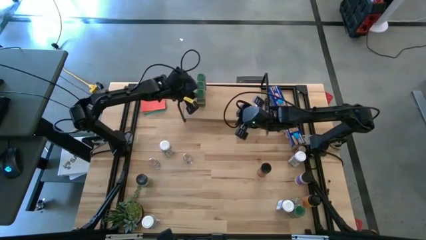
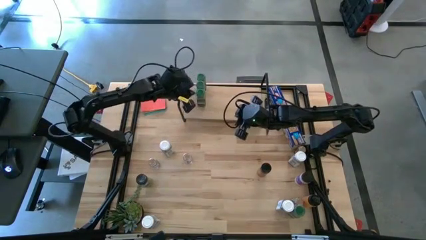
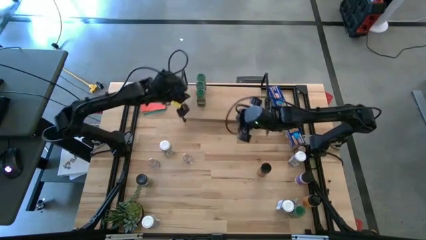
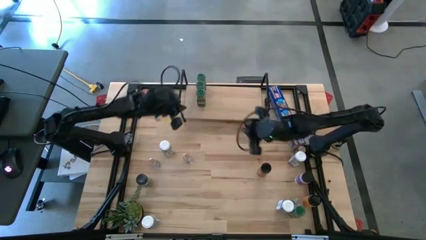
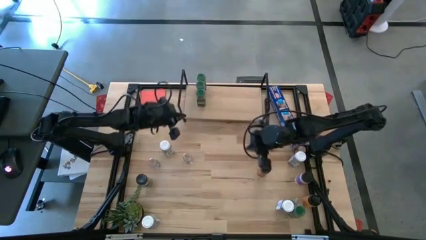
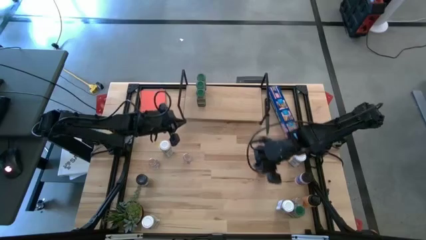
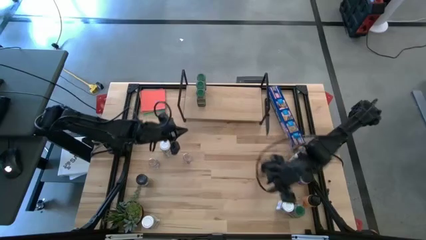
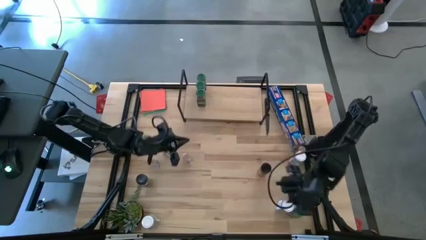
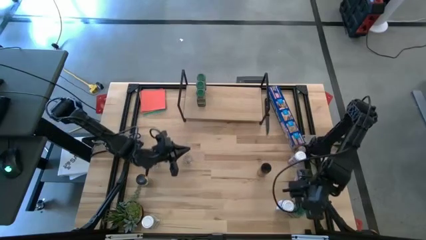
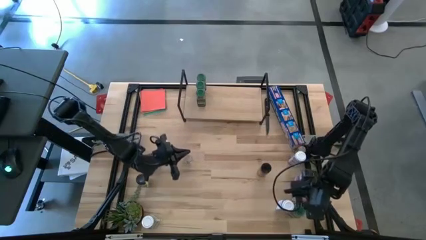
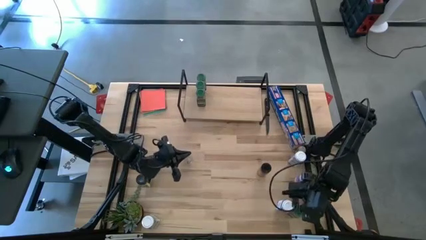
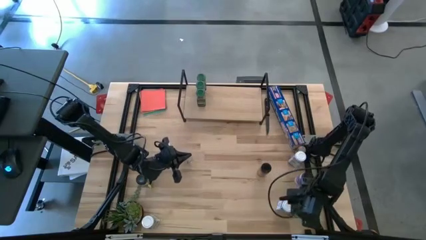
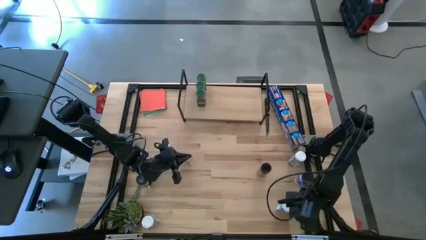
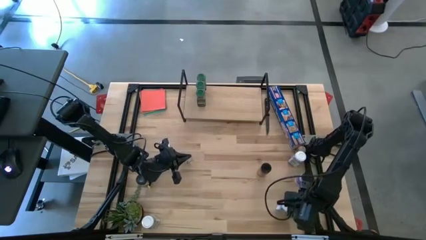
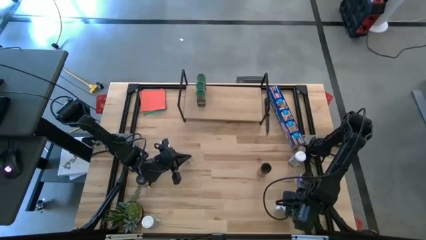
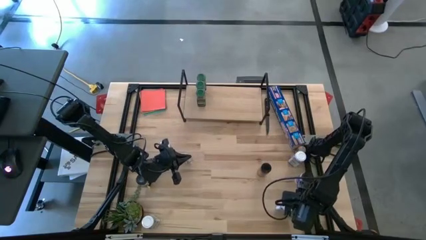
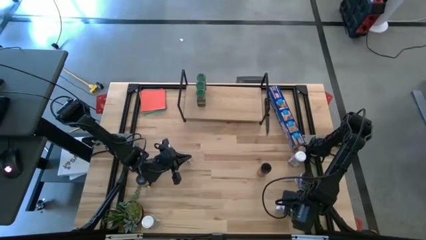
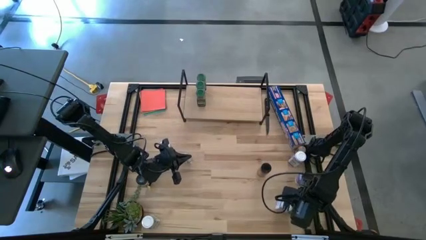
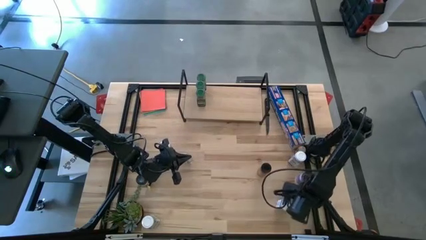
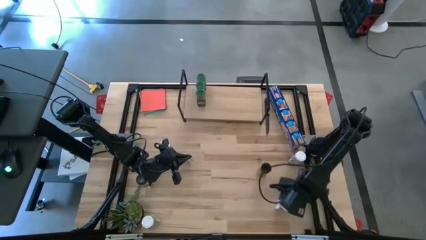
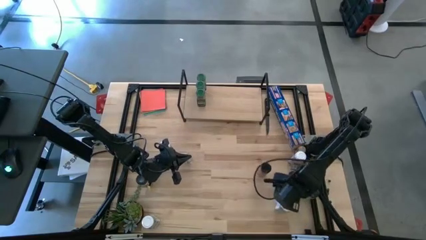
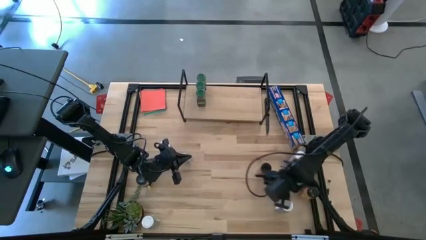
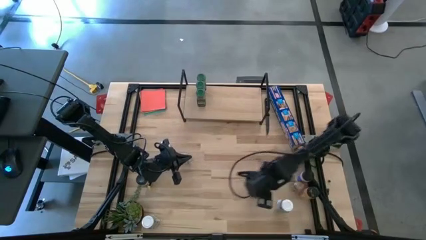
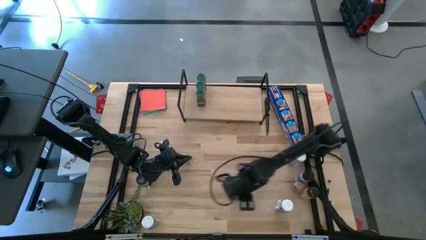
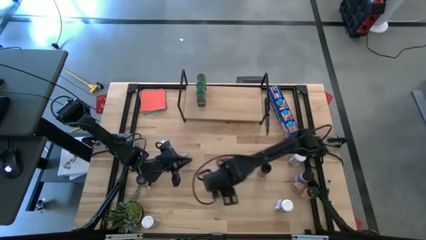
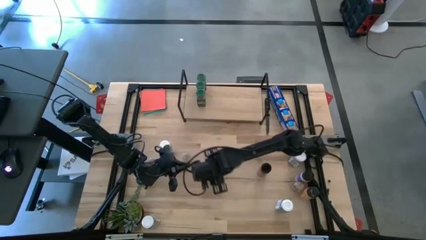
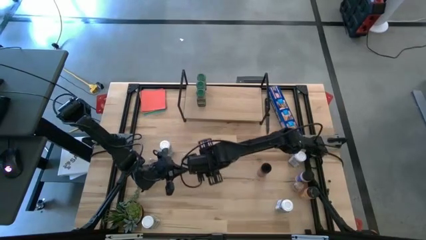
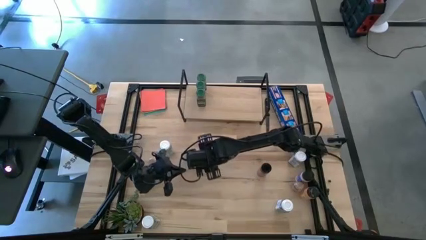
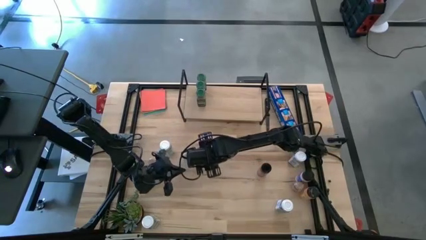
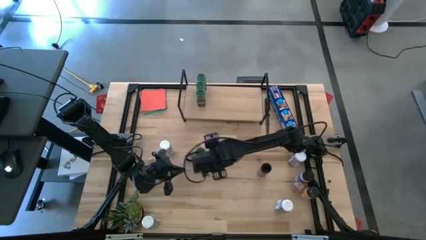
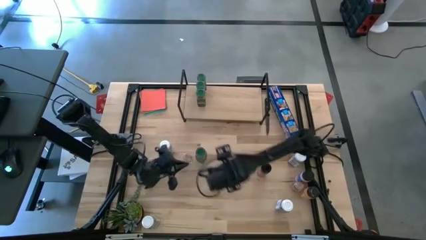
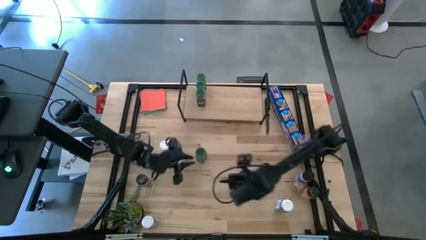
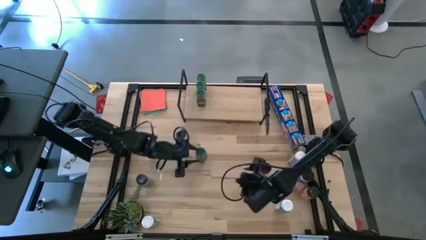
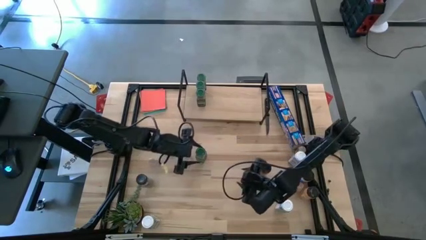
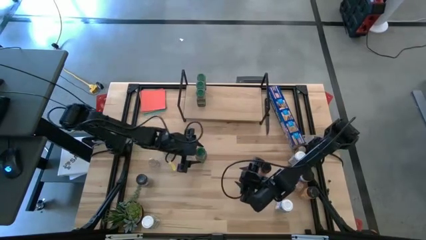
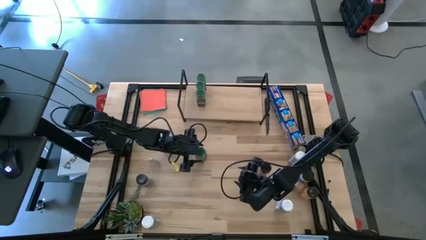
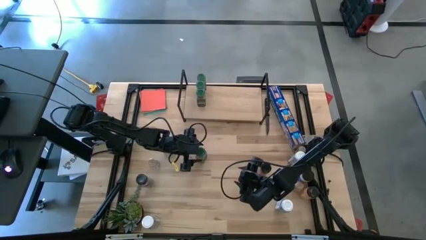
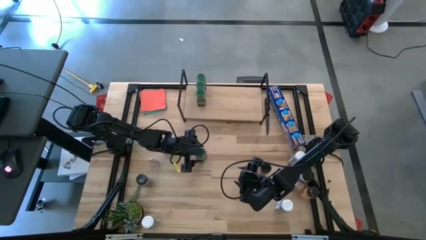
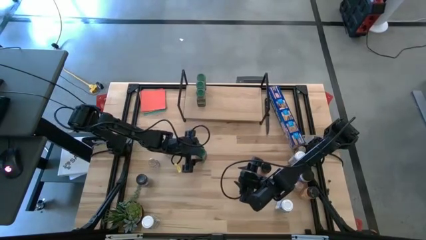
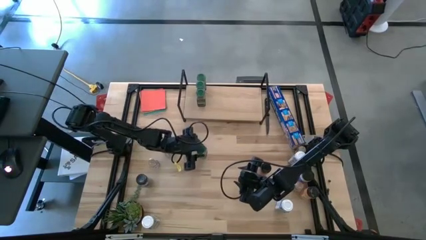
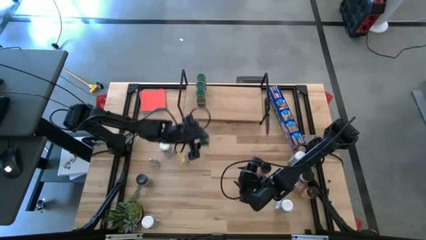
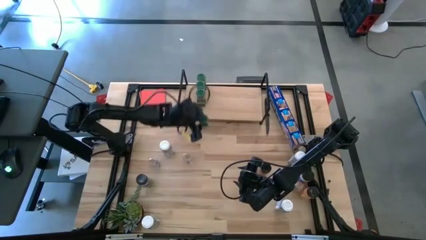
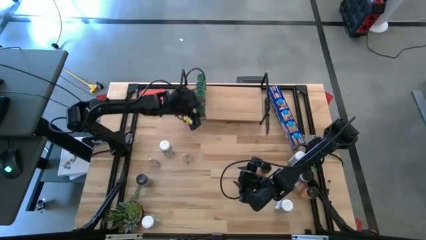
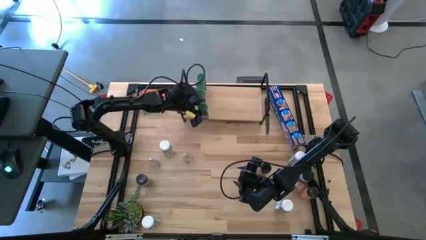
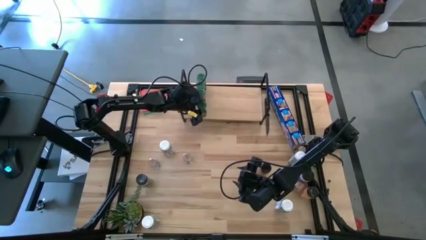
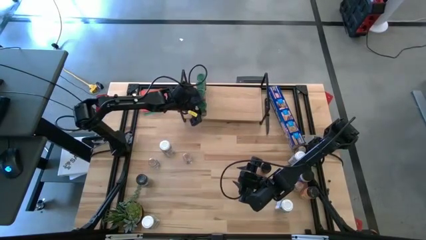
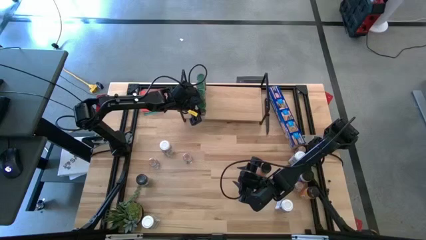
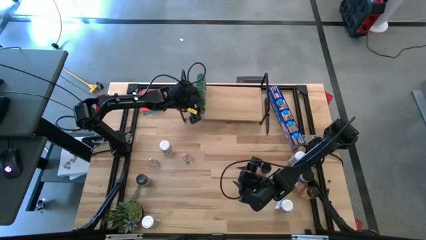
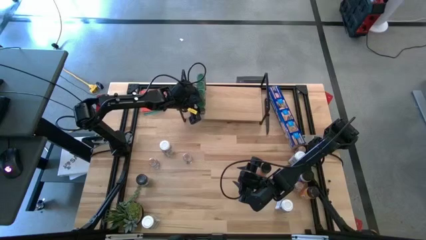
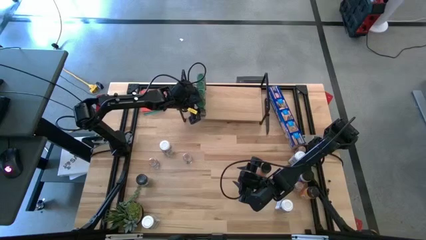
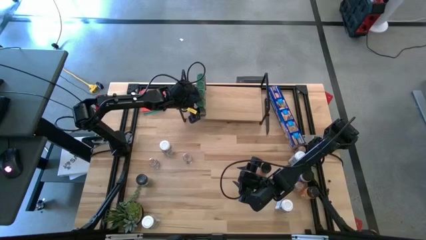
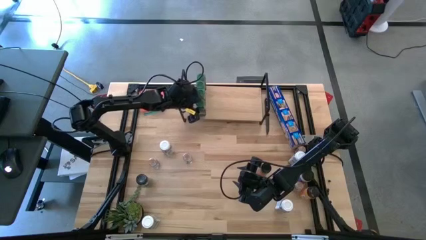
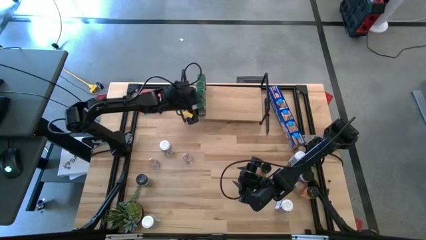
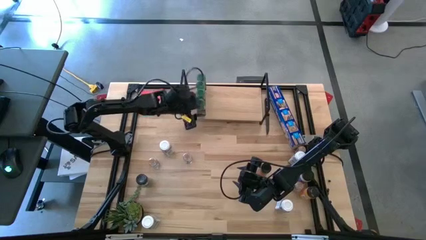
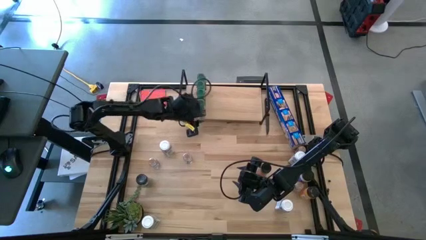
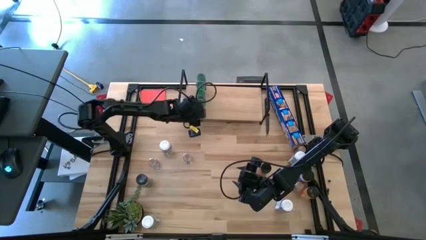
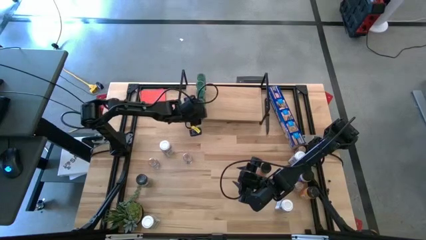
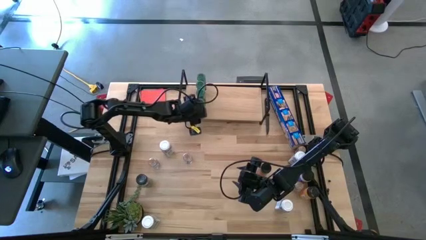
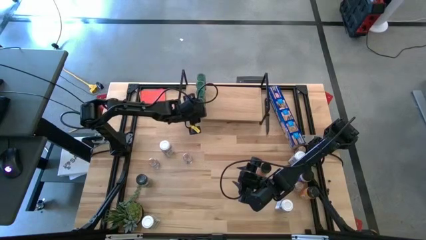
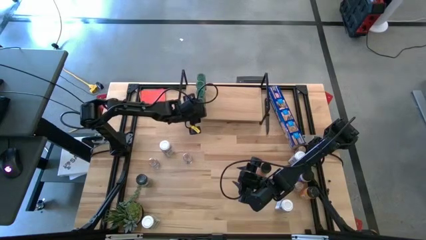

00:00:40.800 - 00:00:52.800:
Task: Shelf spices
Put the green seasoning bottle on the shelf aligned with the other green seasoning bottles

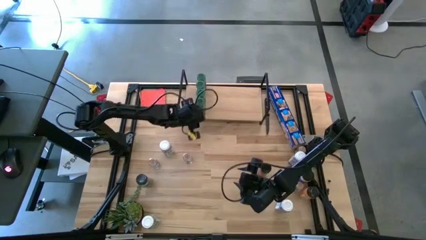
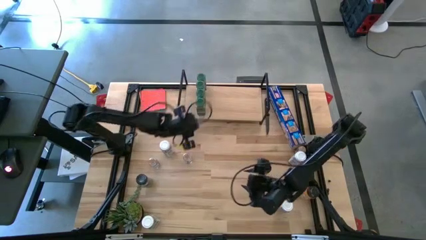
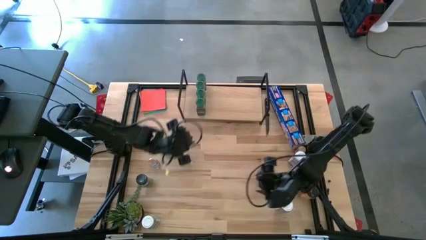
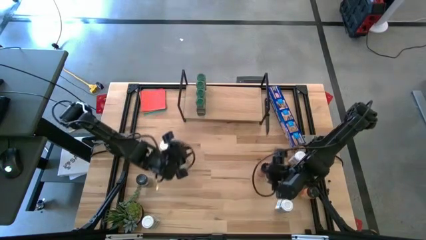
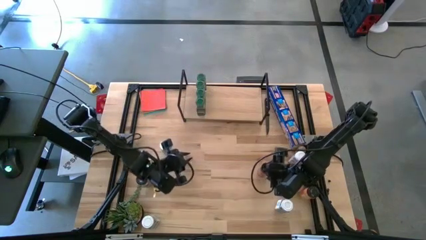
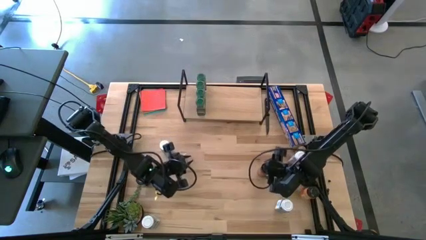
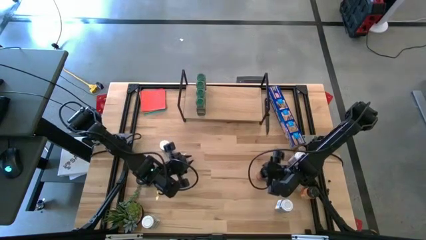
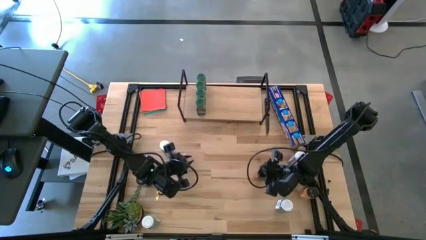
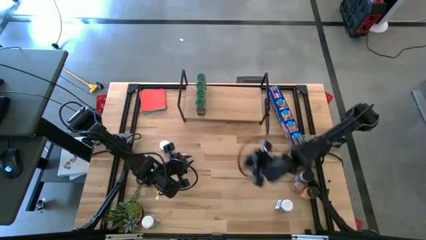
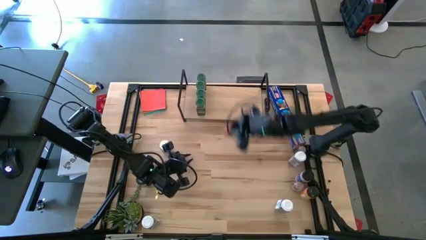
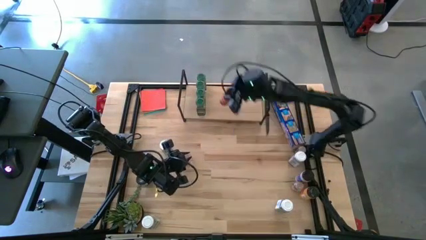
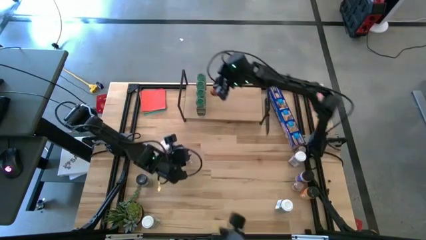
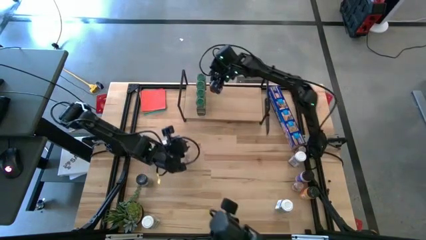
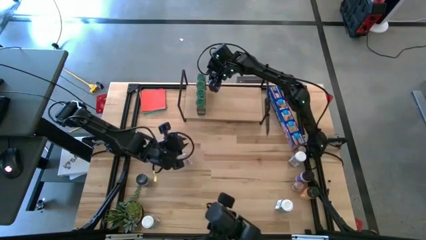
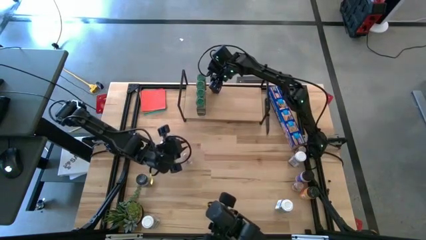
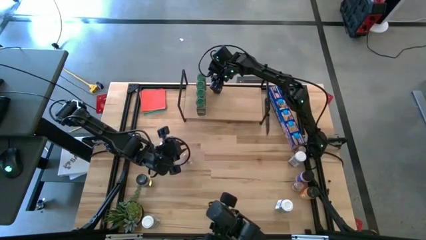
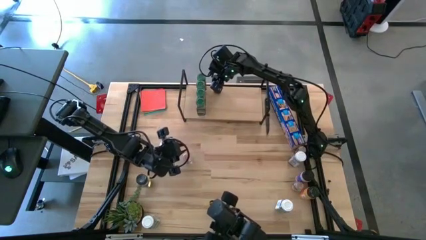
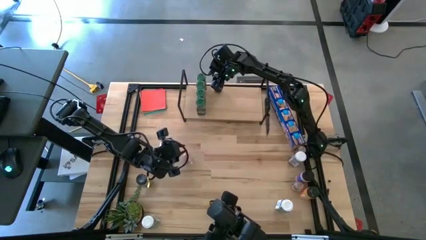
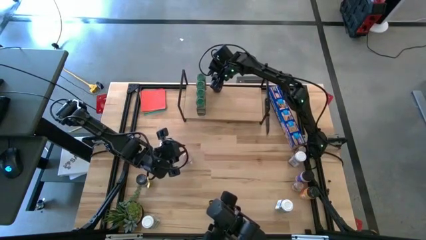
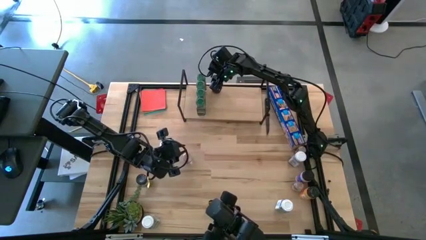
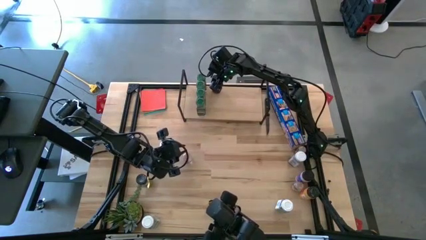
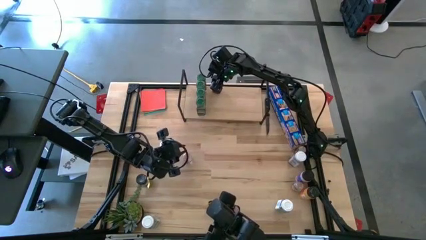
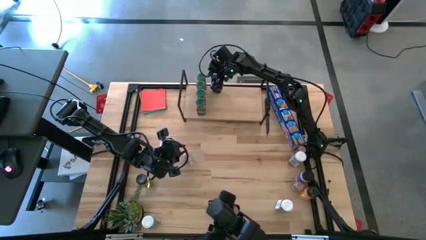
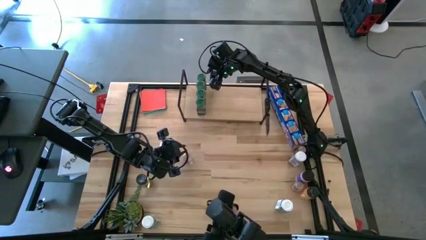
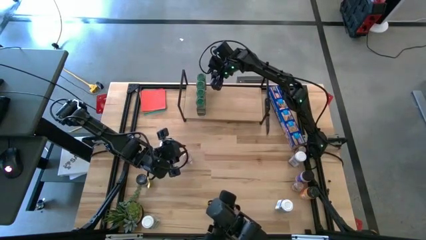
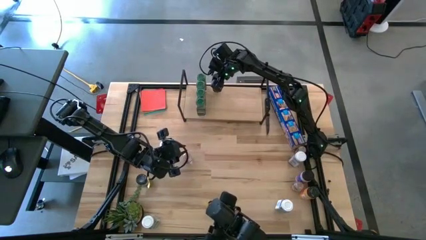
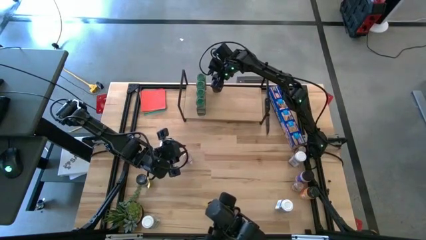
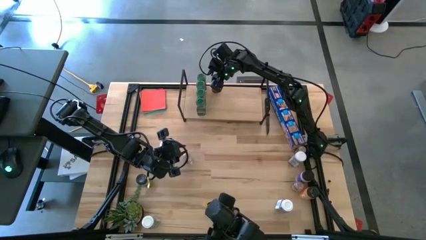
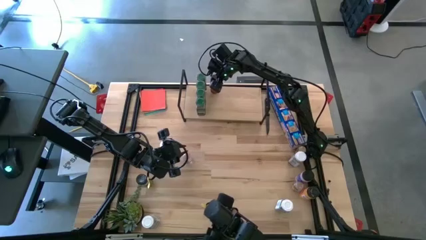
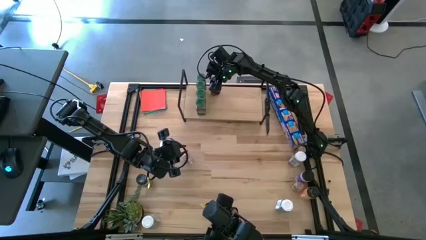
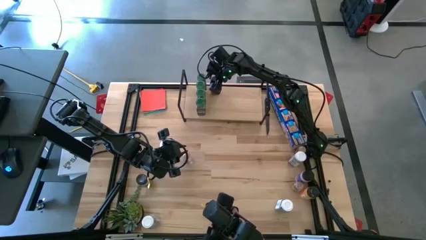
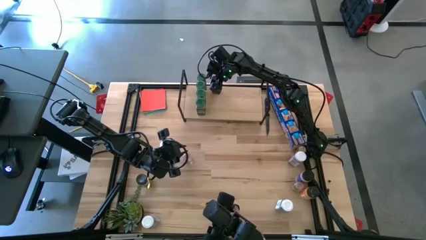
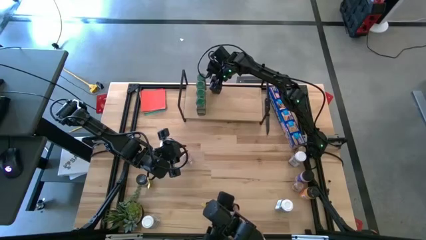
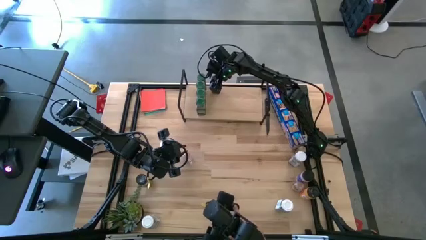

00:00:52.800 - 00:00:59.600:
Put the center black seasoning bottle on the shelf
